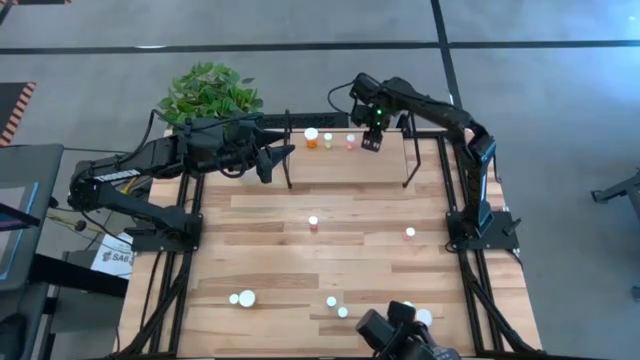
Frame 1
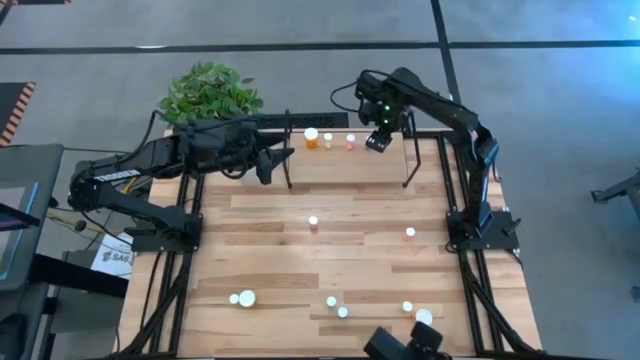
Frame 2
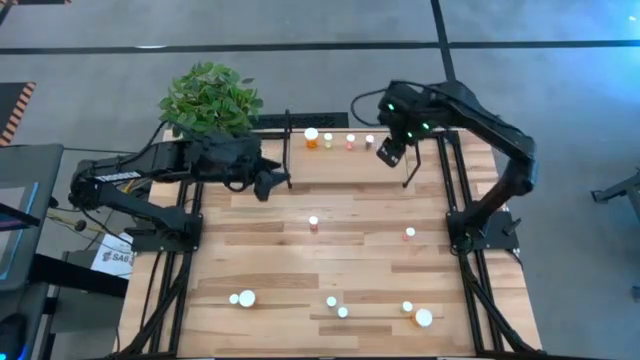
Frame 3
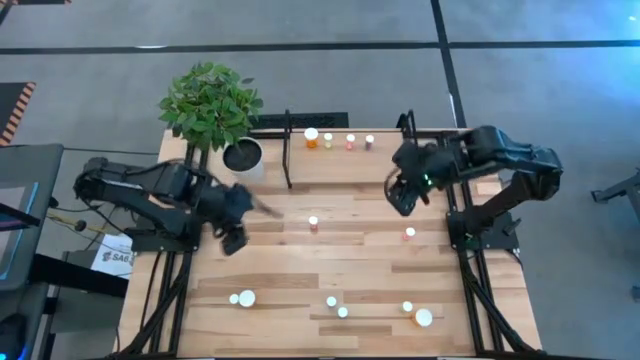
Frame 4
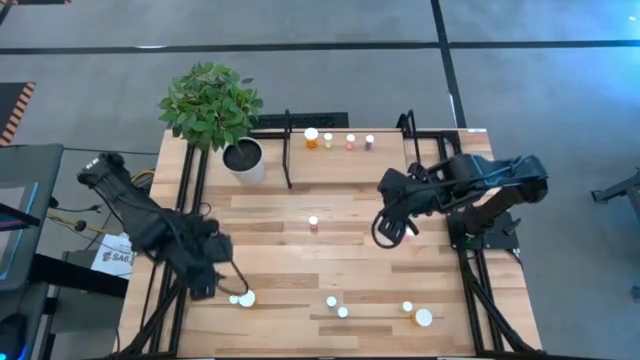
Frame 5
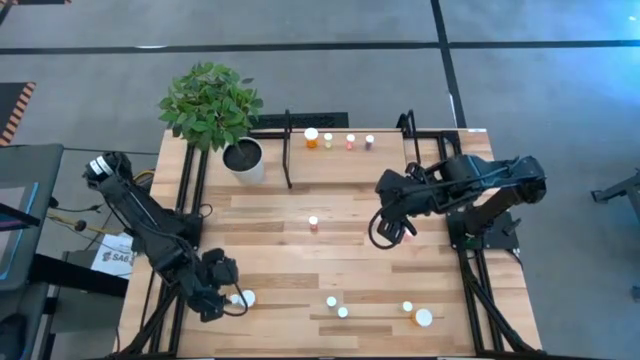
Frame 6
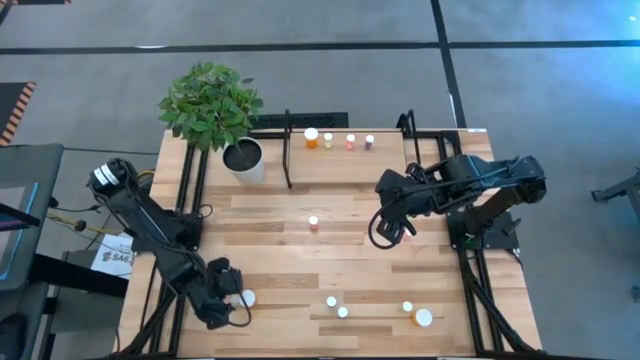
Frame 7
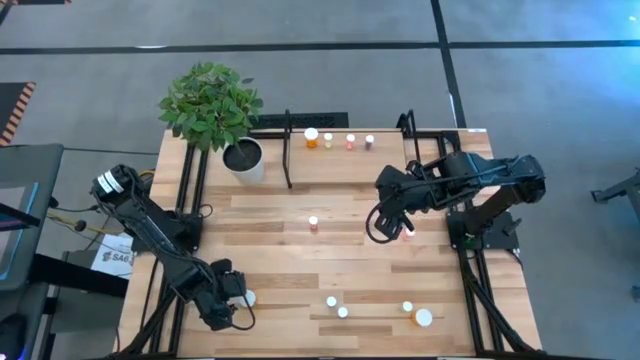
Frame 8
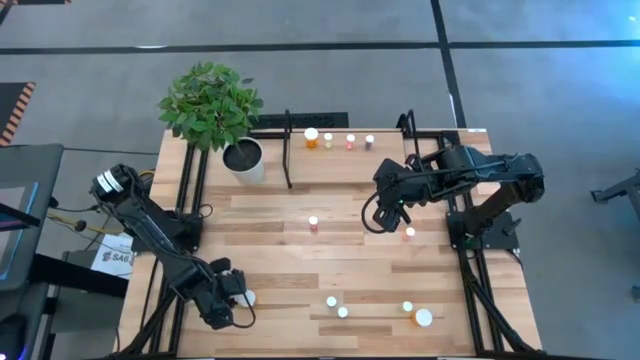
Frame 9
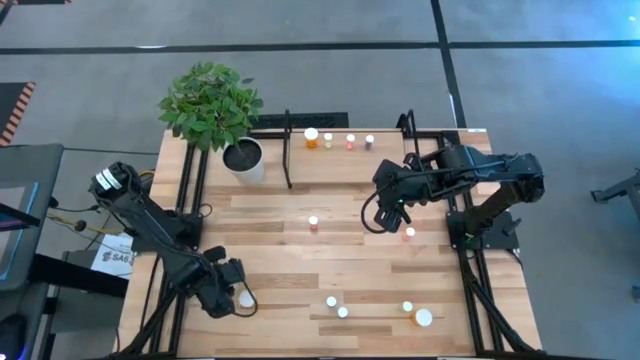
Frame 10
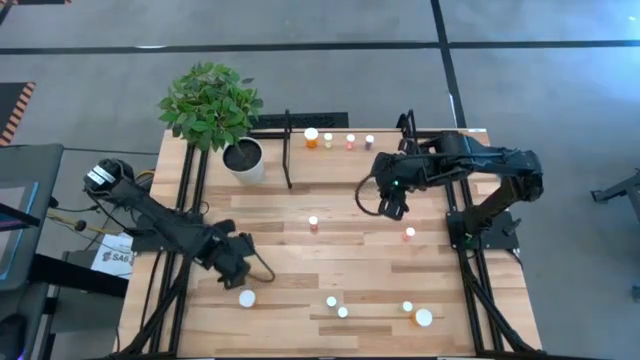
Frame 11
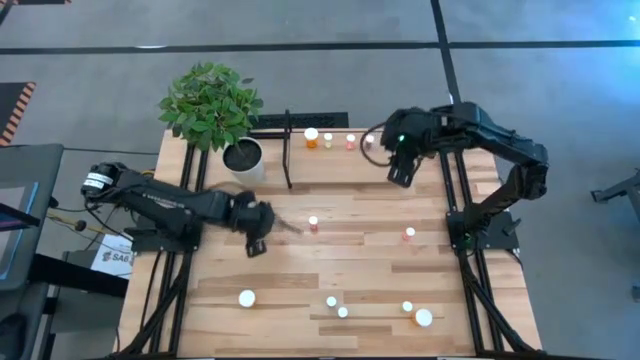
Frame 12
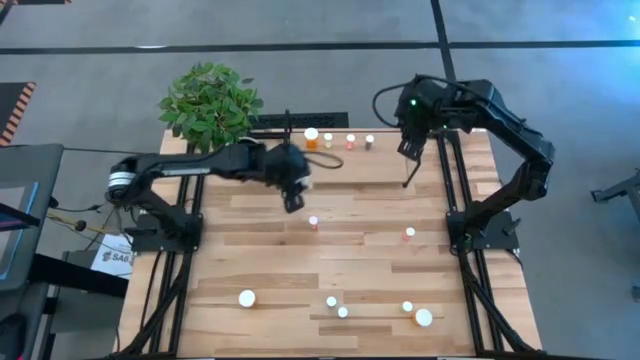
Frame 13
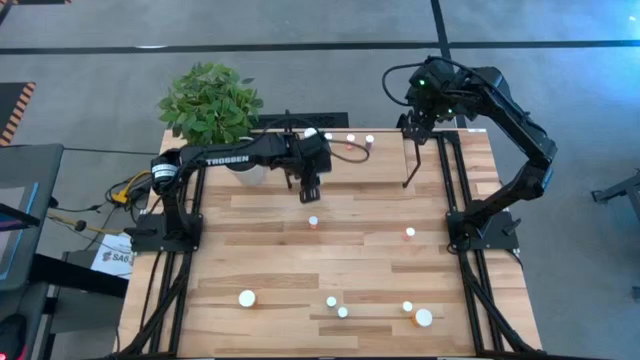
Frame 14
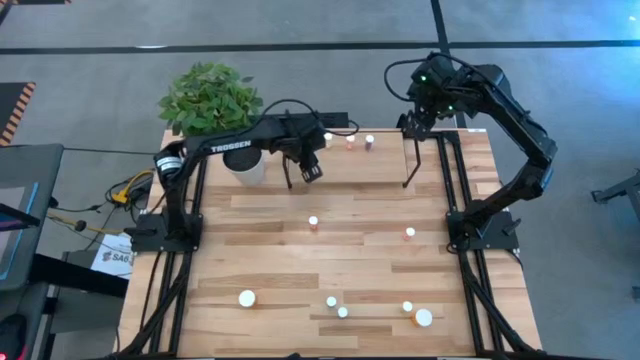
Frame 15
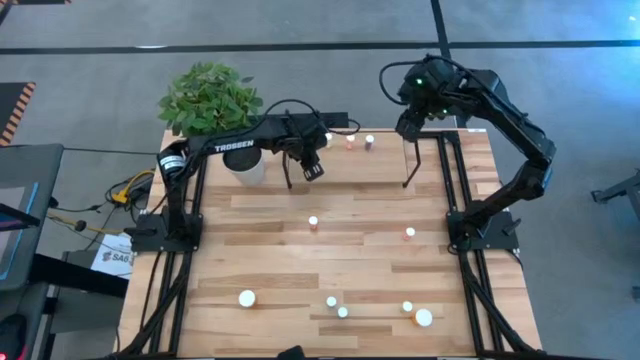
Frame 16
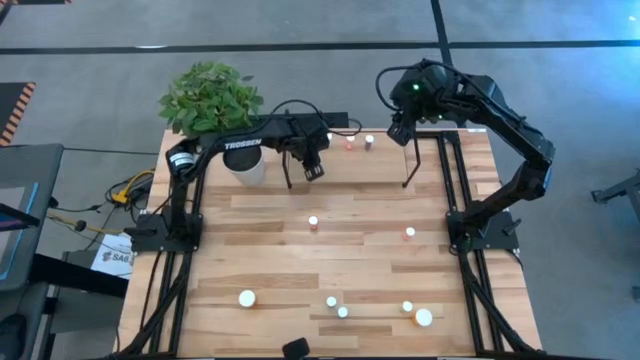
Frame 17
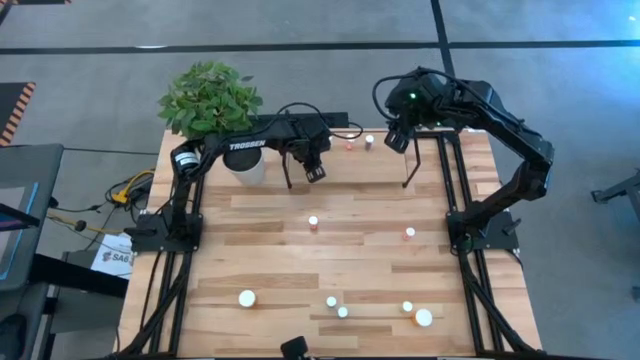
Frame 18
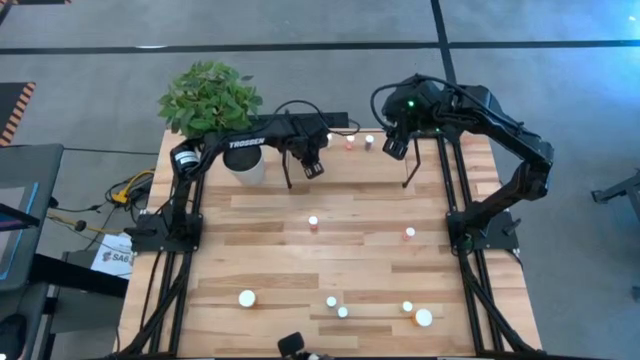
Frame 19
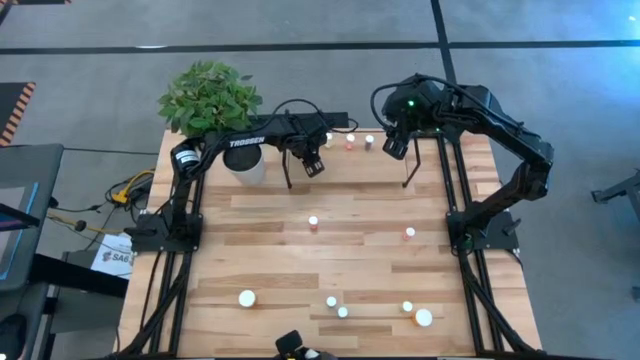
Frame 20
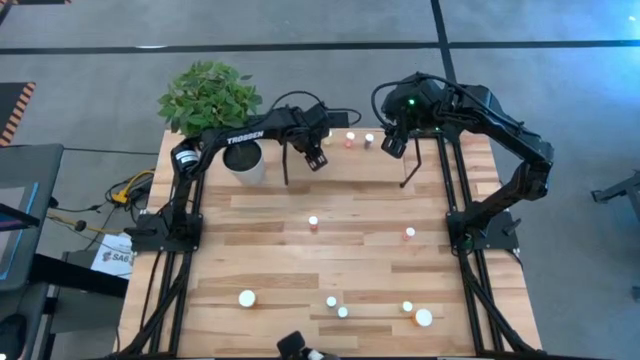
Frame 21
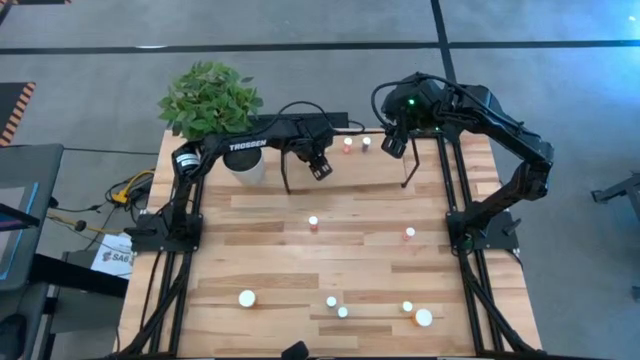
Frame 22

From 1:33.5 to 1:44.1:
Task: Pick and place medicine bottles onto shelf by color
Put the left yellow pill bottle on the shelf

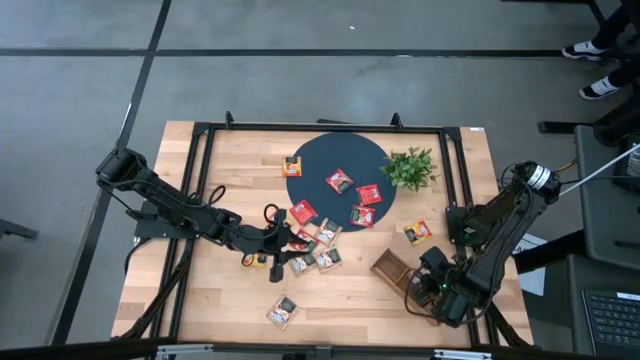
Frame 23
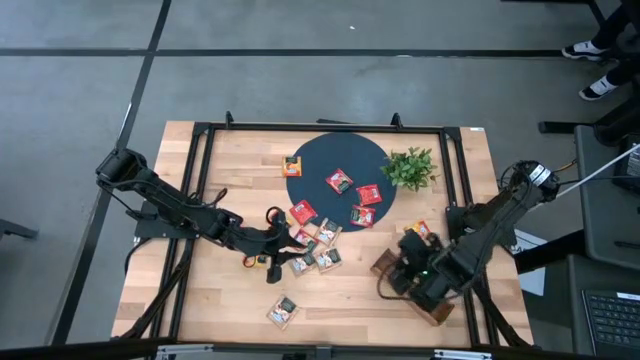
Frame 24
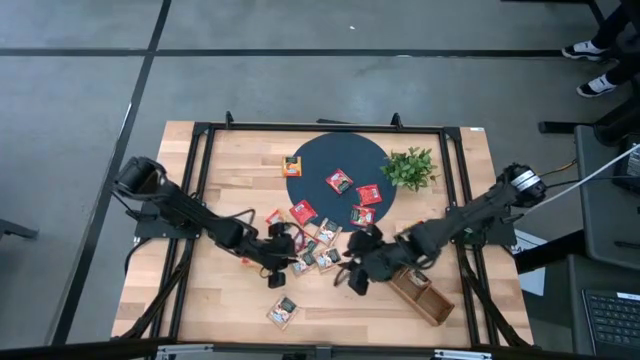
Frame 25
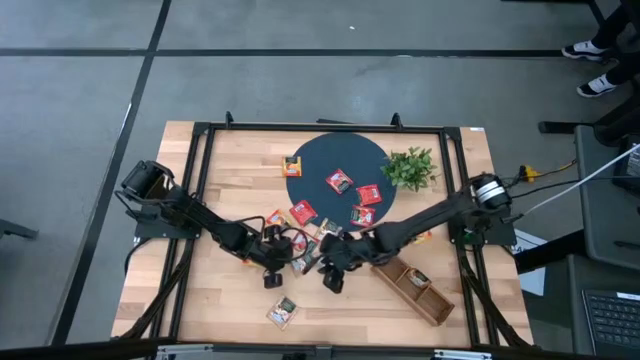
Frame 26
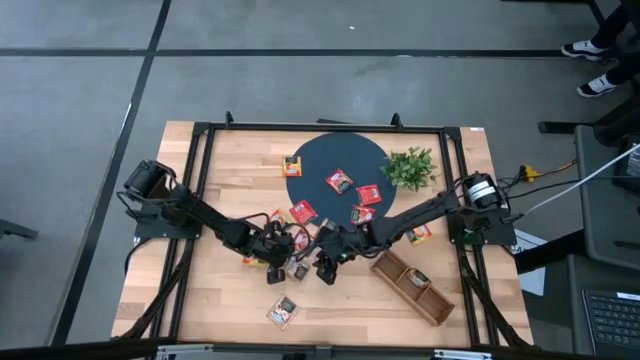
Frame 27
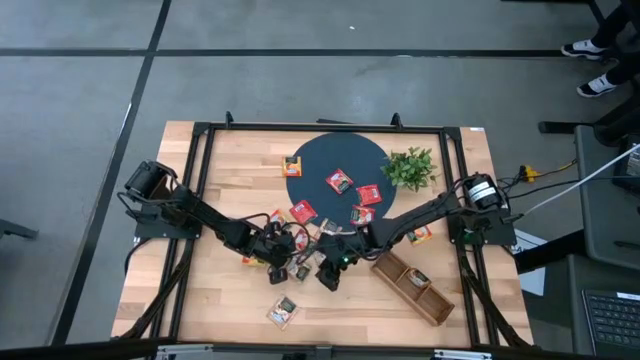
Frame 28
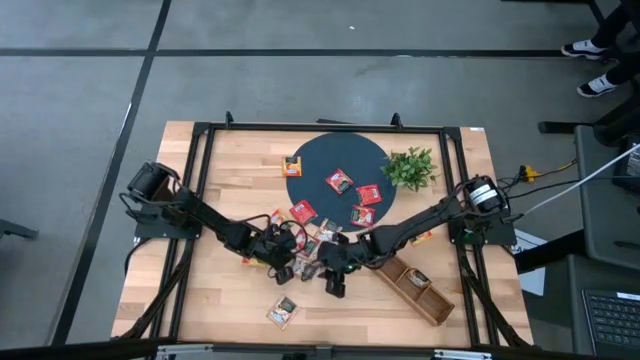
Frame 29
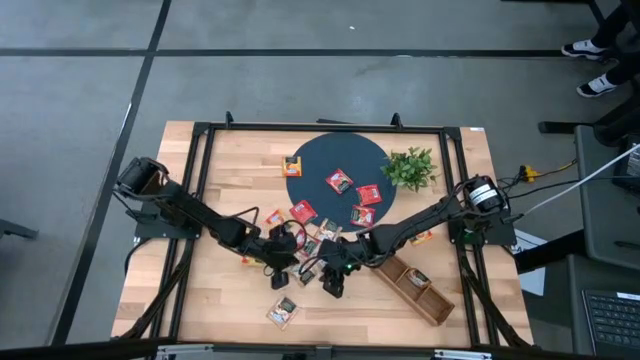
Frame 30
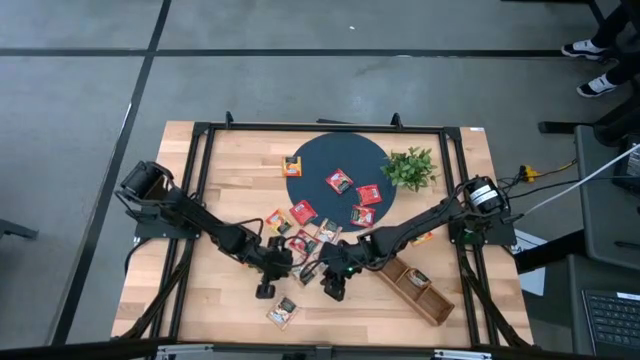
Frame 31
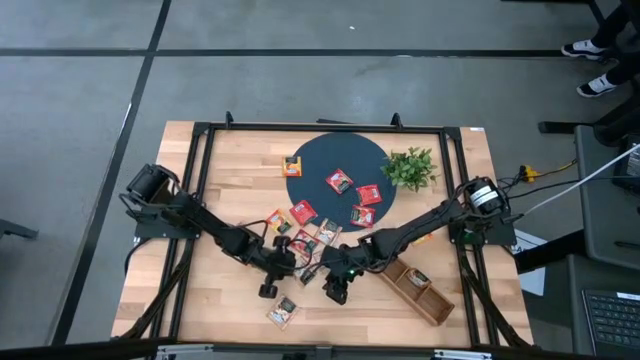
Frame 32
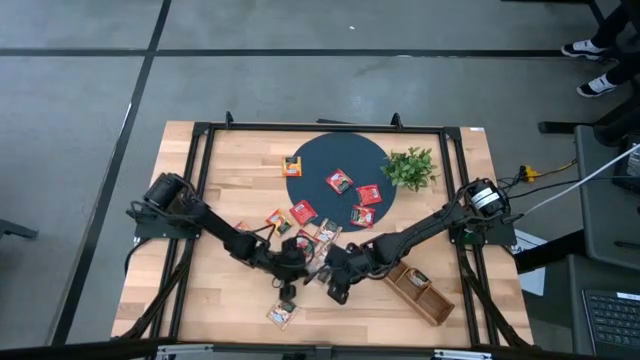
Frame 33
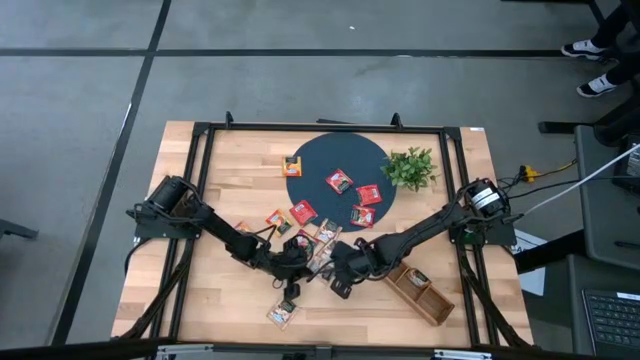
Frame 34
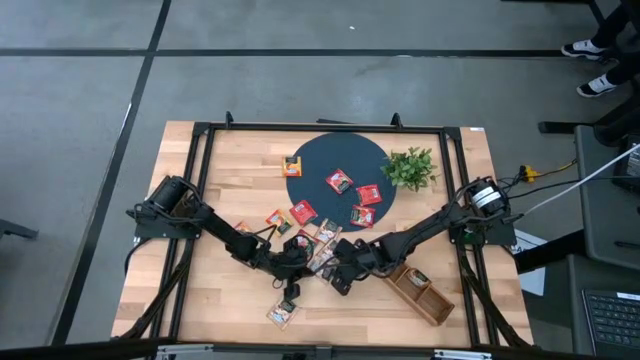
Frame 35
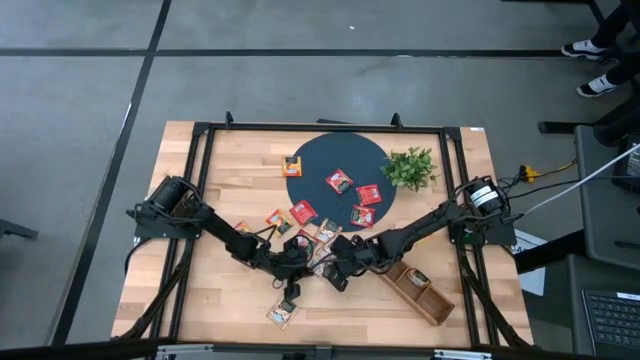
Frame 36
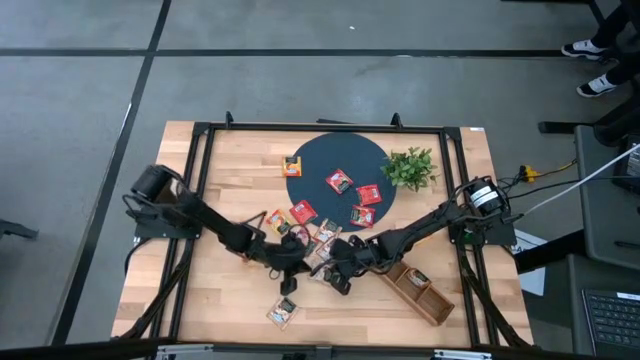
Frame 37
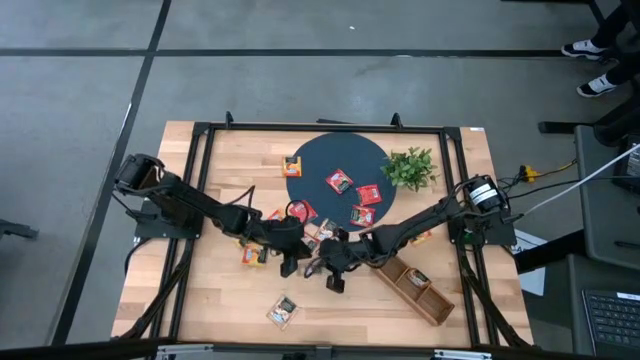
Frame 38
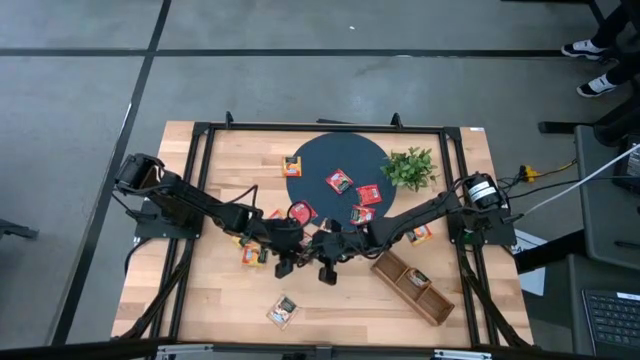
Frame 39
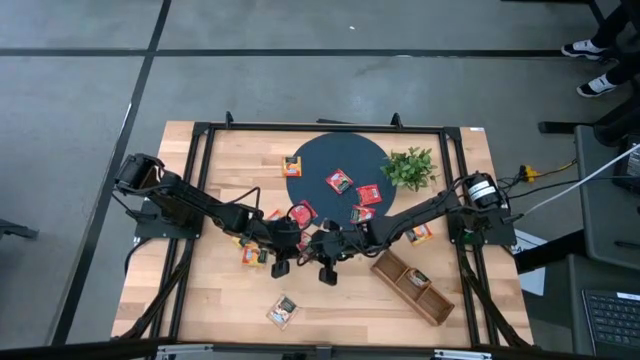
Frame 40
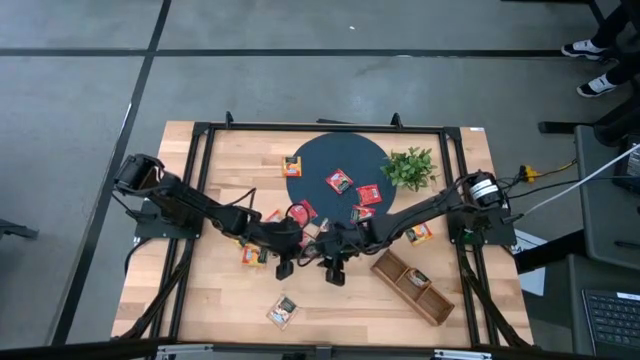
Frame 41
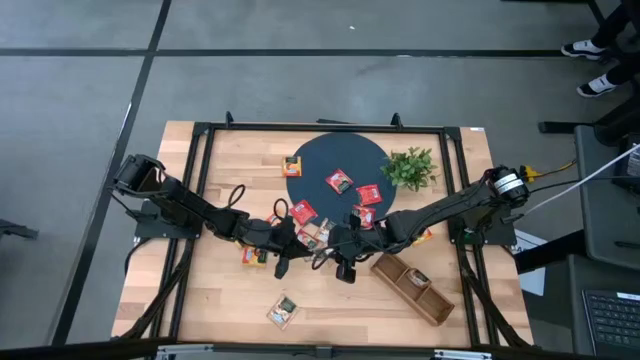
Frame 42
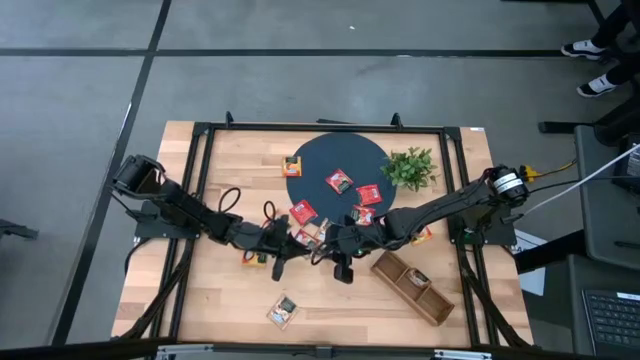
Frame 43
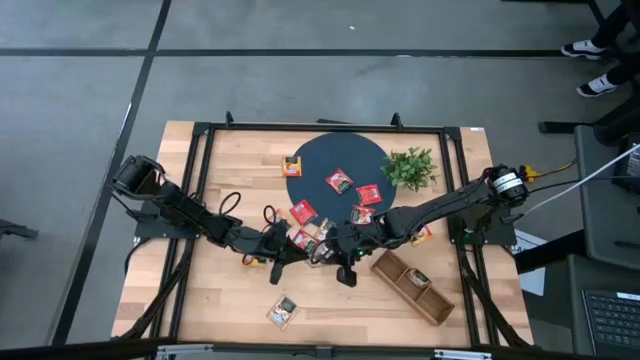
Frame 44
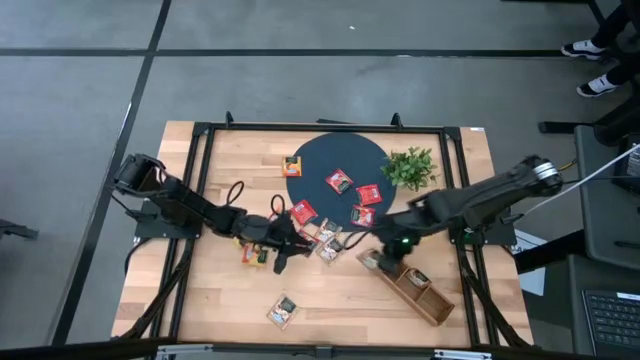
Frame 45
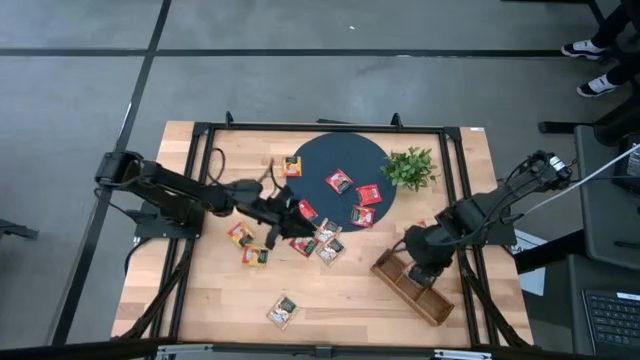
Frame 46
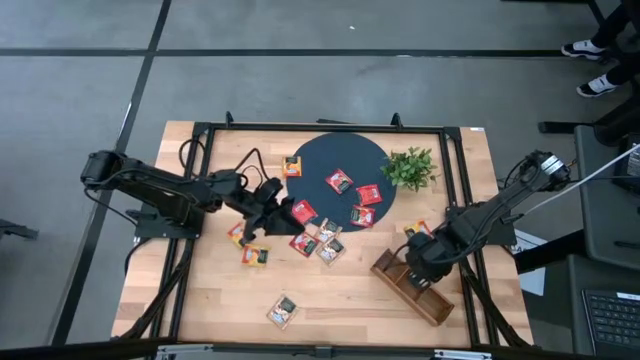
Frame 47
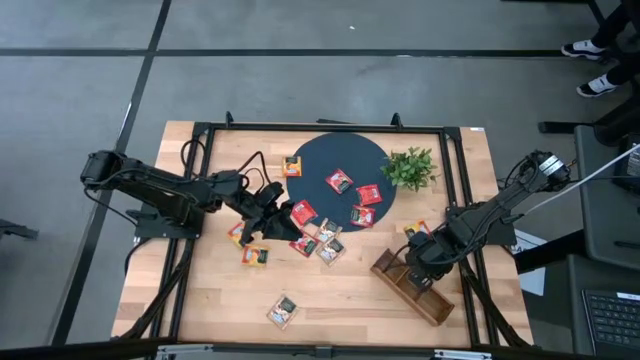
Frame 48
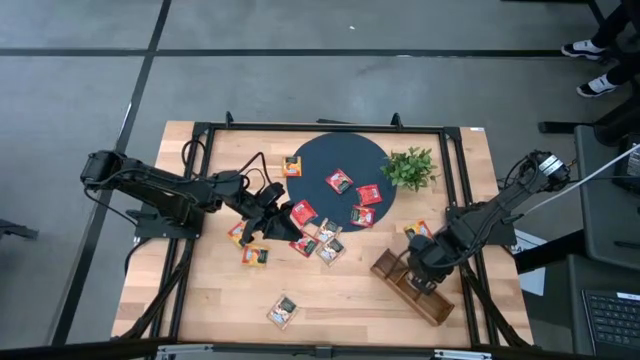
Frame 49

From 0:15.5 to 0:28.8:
Task: Pick & Place Tea
Put the brown tea bag into the middle section of the wooden organizer
